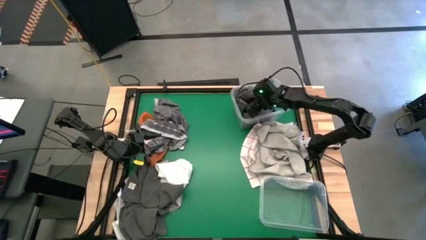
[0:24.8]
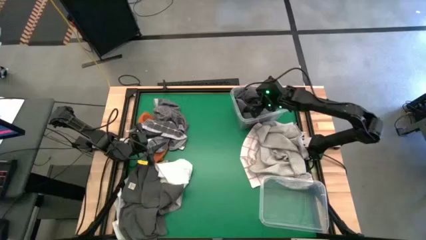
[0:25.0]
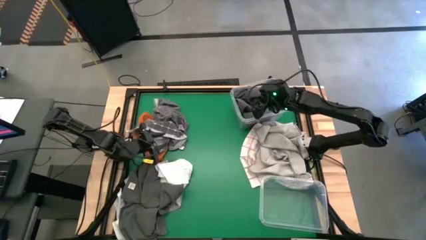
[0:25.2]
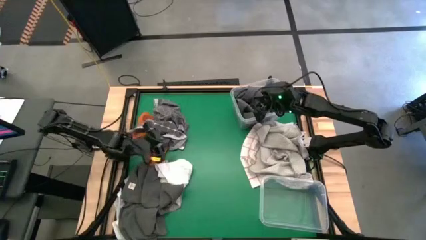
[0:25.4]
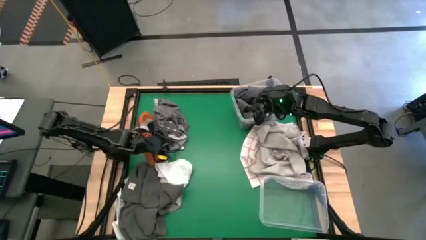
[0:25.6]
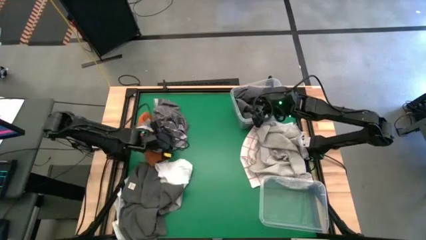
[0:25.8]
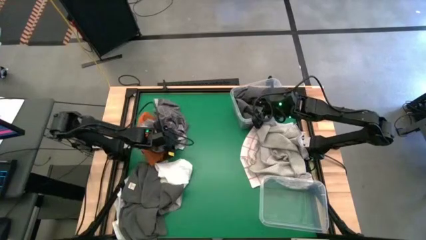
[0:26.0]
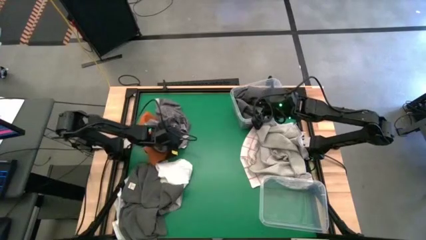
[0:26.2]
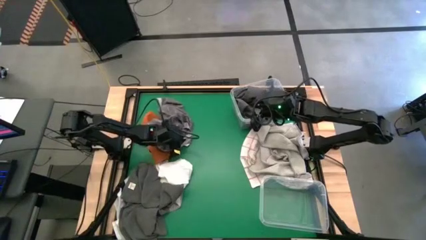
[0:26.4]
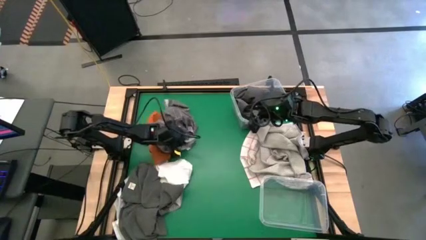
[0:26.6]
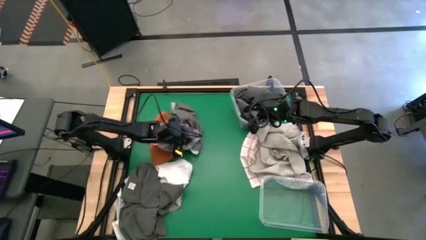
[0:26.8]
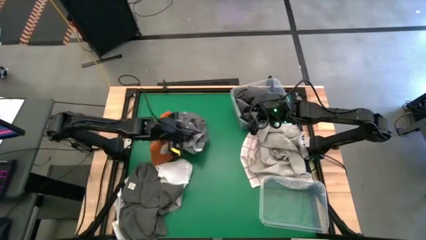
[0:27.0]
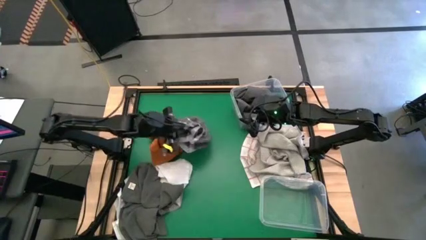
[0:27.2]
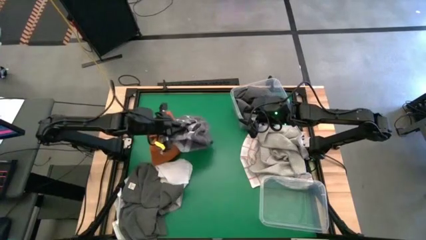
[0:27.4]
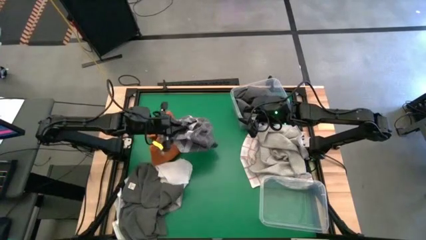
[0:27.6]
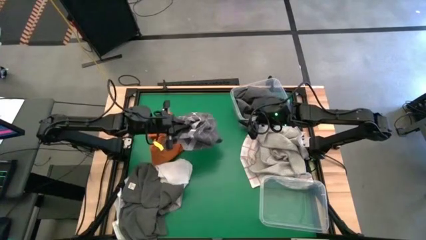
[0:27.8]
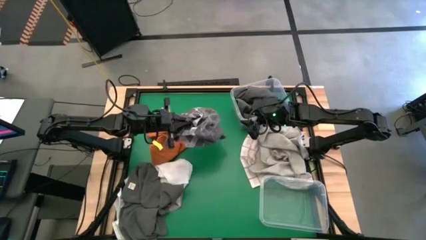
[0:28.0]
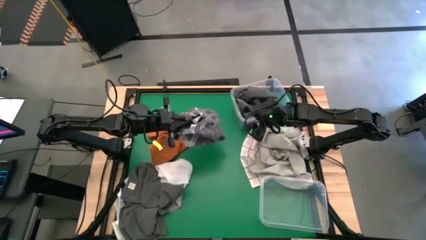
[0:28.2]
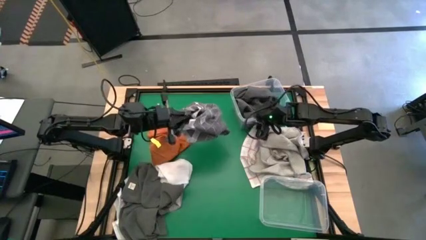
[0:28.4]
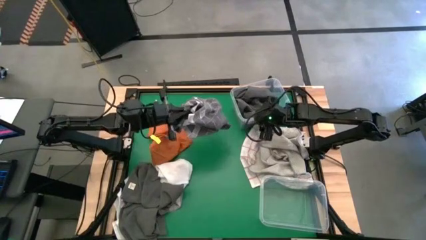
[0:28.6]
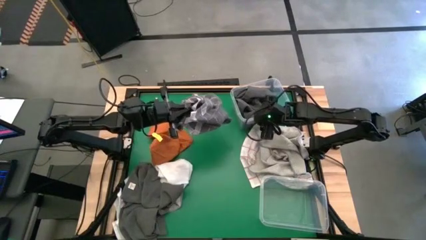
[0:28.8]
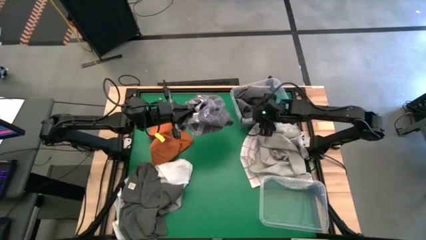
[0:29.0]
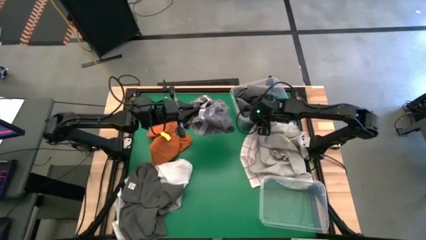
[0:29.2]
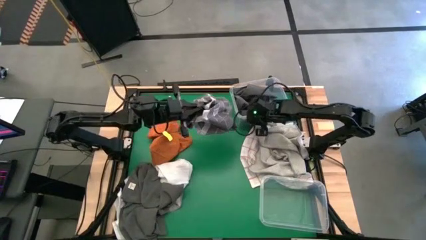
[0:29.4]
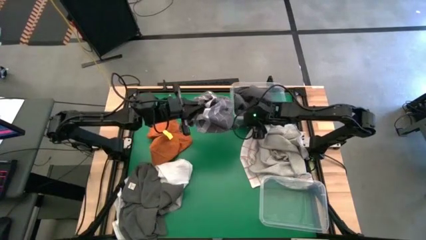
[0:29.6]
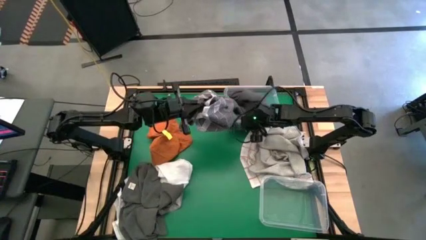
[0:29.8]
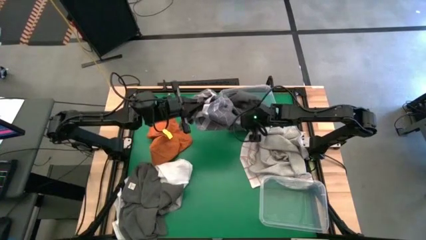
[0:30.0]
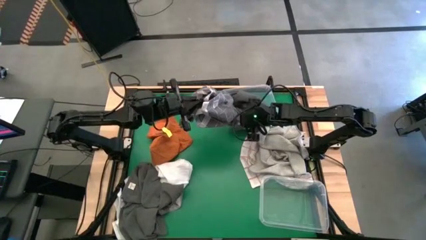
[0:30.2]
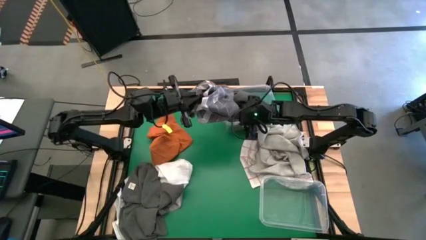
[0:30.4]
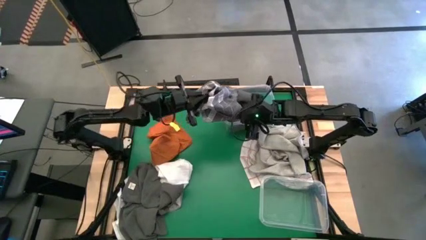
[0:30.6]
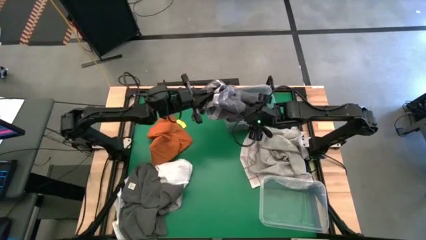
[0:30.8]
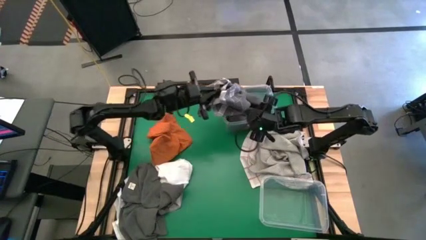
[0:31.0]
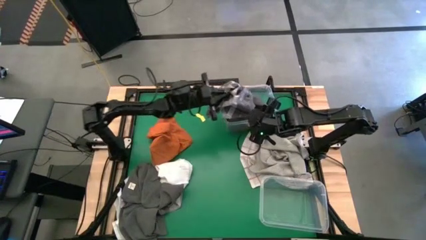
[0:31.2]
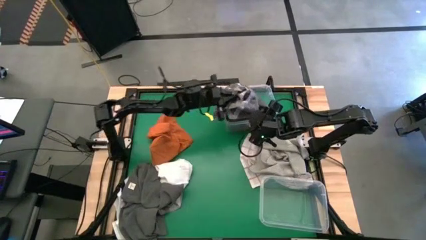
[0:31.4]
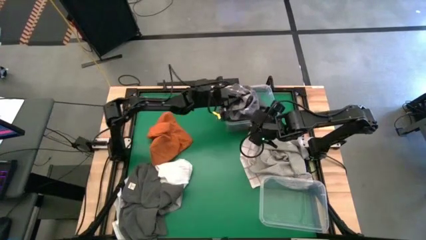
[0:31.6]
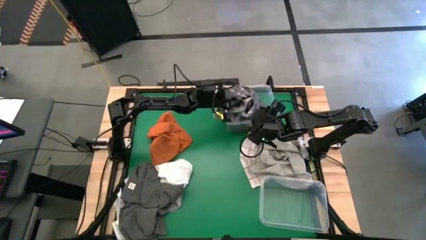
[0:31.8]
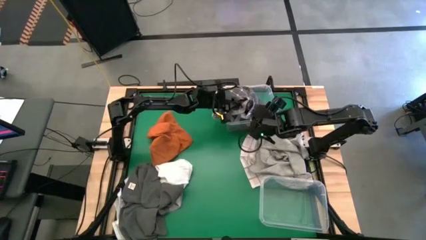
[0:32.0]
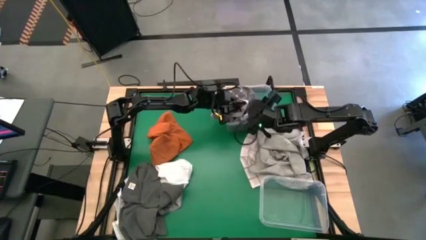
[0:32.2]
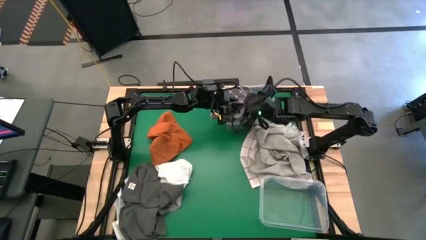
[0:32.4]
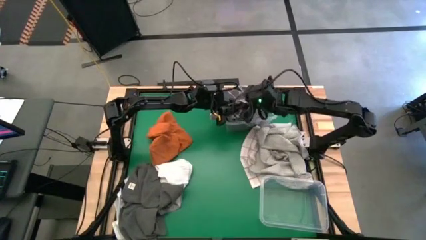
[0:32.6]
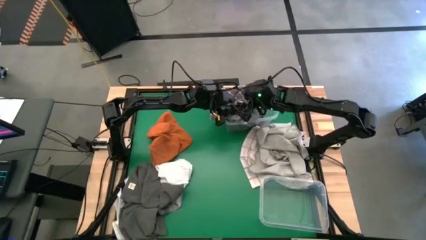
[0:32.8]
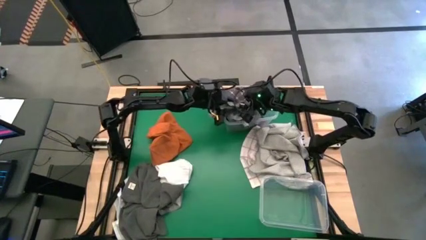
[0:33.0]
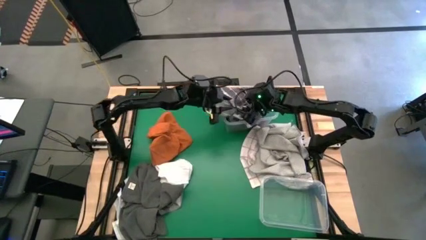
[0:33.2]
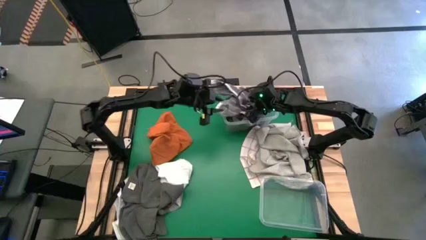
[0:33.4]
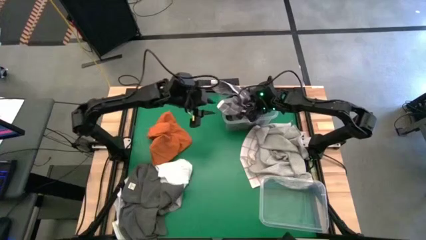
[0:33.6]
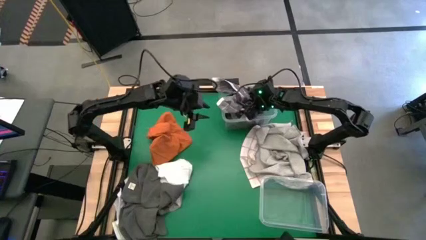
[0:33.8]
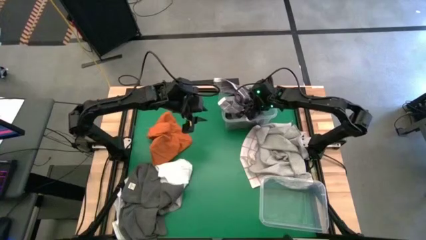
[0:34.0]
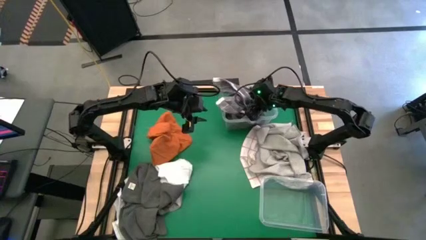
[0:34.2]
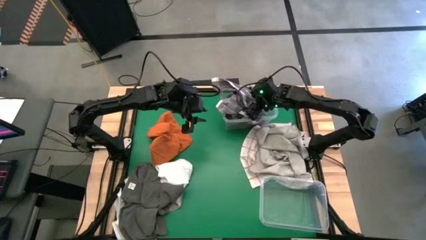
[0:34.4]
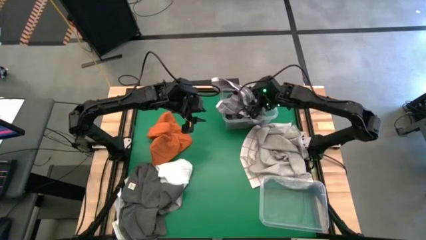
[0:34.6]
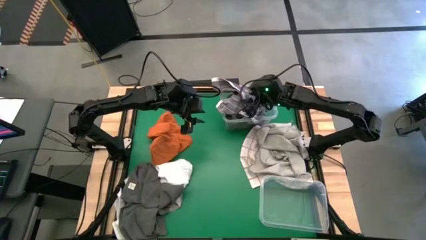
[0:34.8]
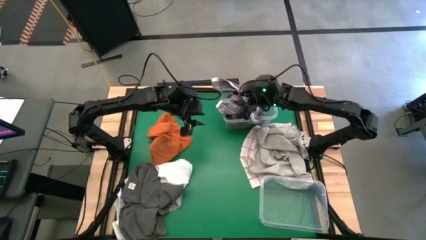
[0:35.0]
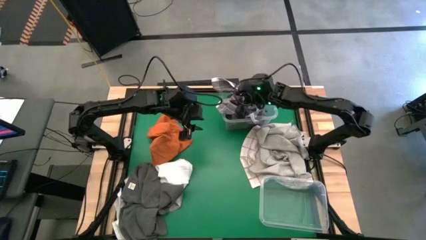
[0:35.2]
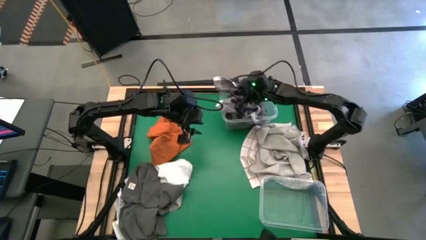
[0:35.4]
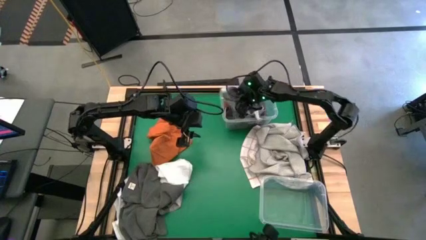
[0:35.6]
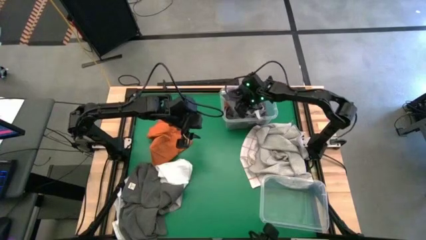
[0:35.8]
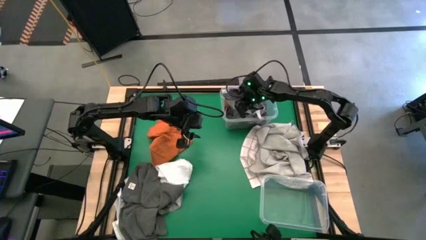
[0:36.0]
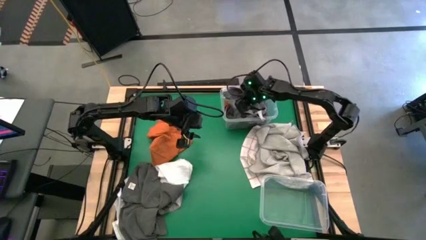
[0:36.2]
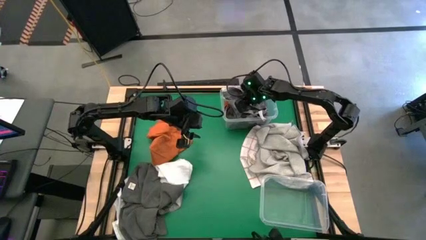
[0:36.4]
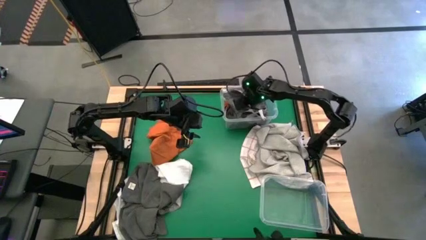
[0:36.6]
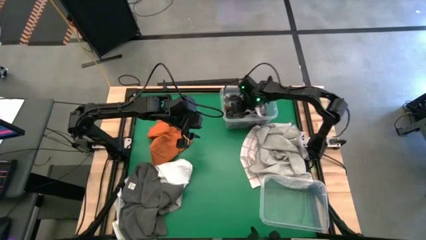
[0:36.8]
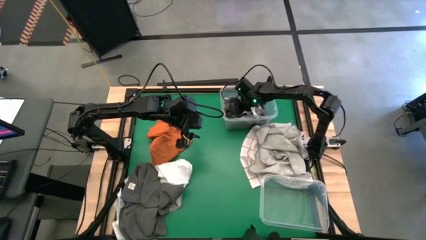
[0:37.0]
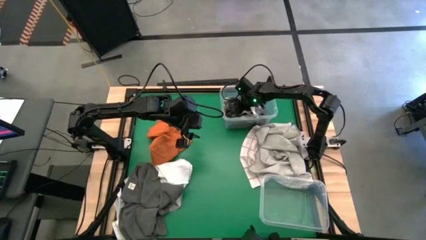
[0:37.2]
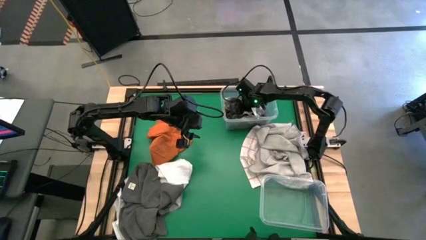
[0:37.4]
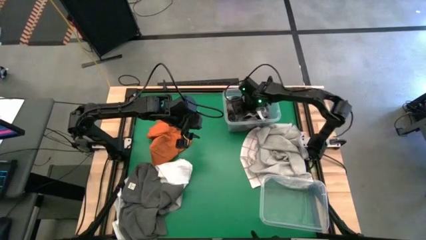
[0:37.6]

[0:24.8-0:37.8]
Task: Sort towels by color in basket
Put the gray patterned towel into the top transparent bin
